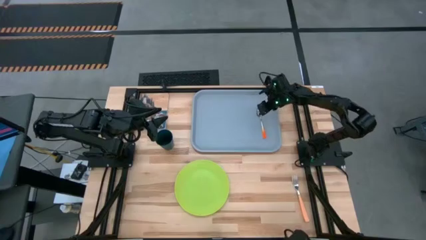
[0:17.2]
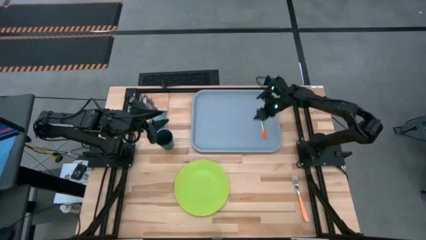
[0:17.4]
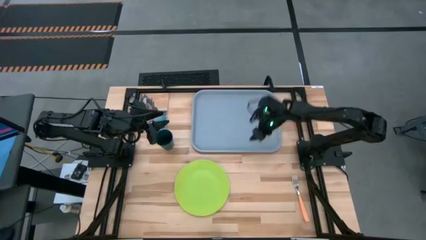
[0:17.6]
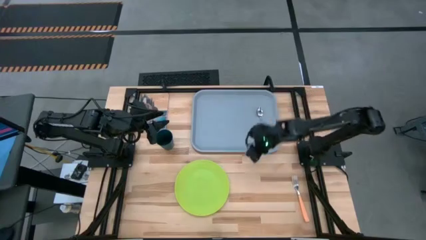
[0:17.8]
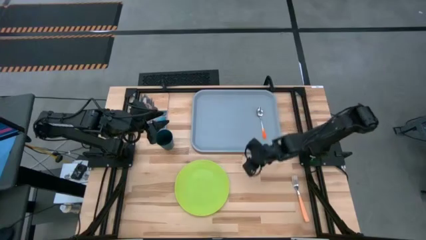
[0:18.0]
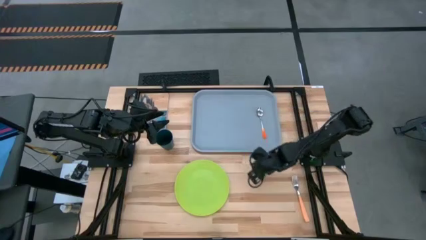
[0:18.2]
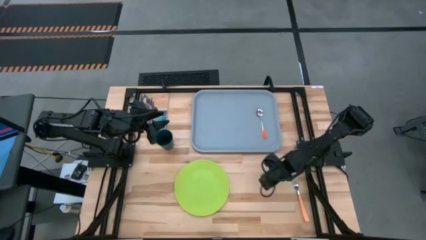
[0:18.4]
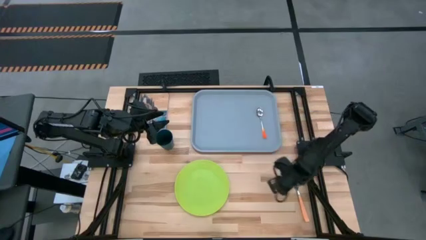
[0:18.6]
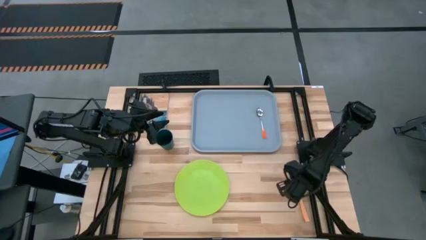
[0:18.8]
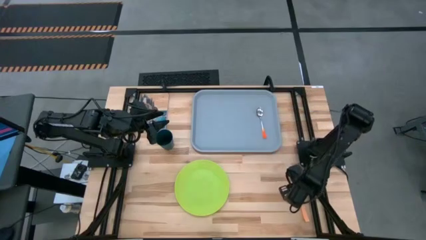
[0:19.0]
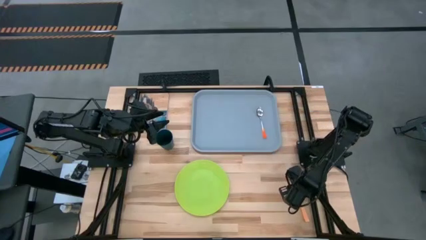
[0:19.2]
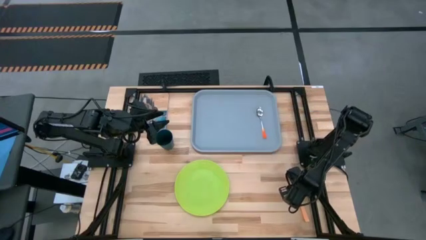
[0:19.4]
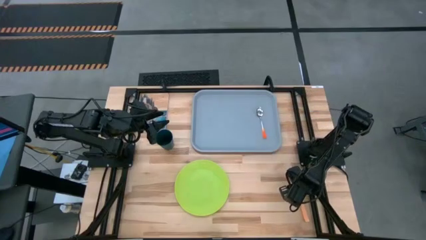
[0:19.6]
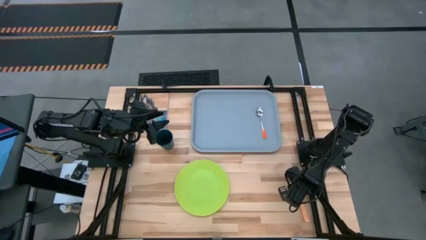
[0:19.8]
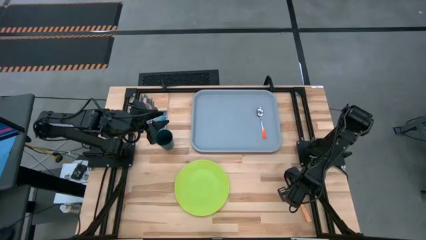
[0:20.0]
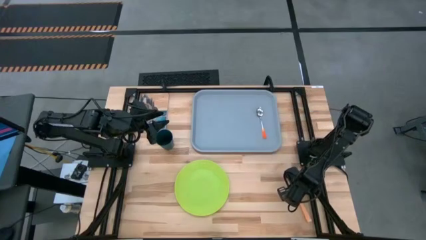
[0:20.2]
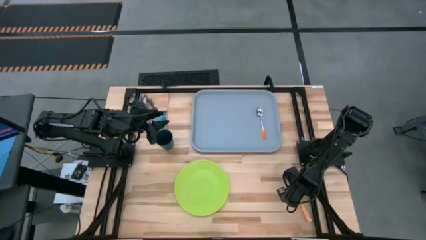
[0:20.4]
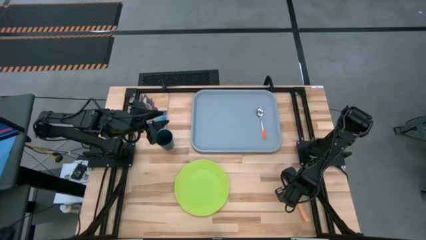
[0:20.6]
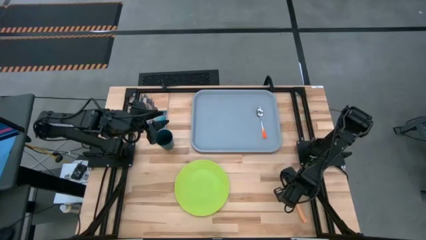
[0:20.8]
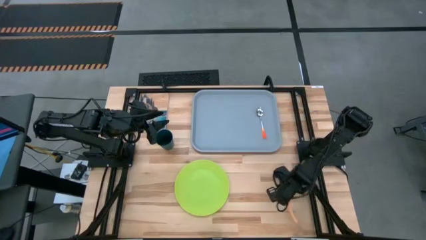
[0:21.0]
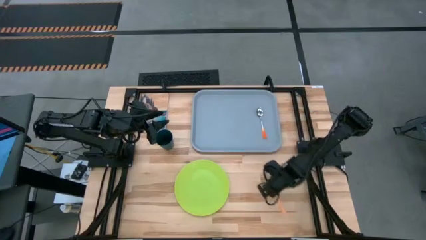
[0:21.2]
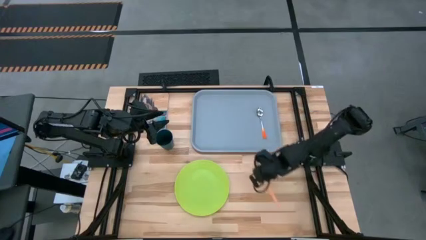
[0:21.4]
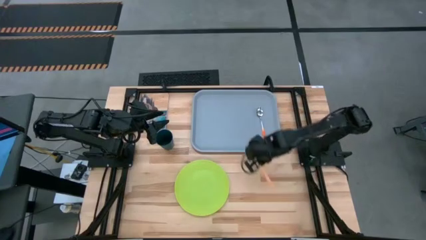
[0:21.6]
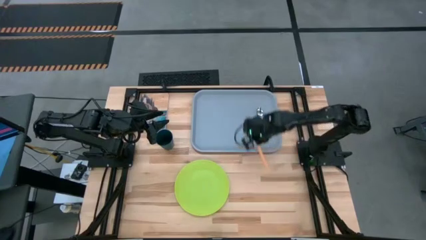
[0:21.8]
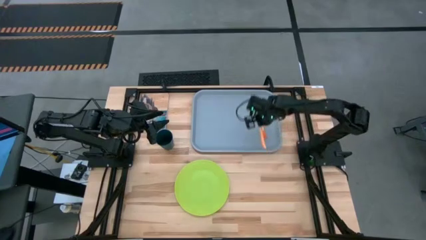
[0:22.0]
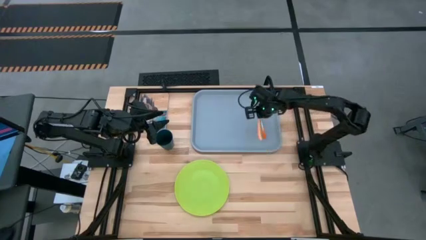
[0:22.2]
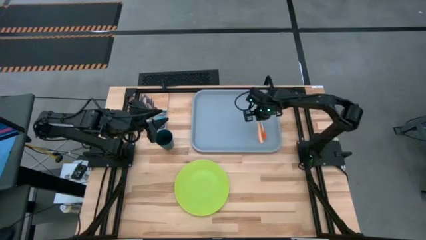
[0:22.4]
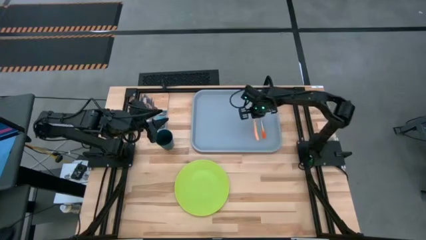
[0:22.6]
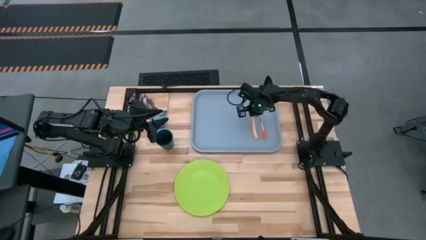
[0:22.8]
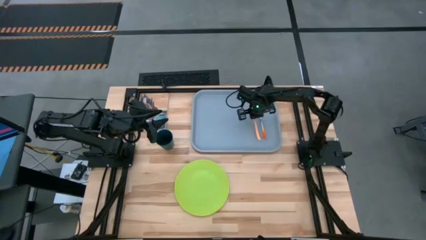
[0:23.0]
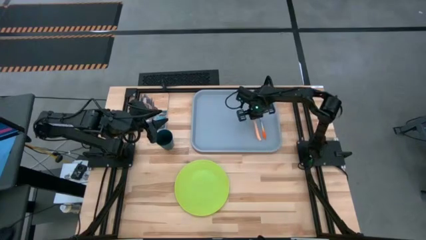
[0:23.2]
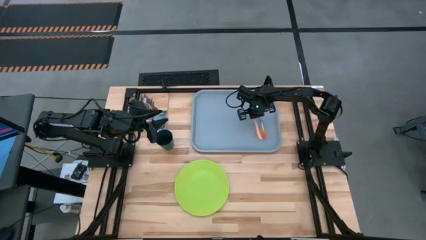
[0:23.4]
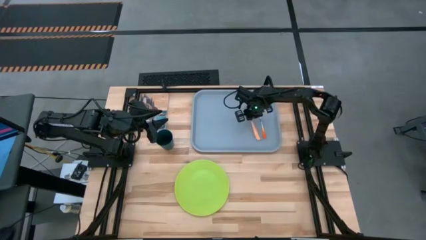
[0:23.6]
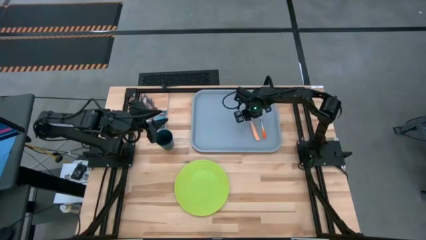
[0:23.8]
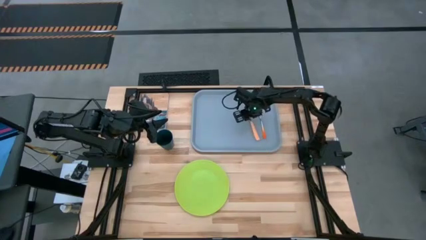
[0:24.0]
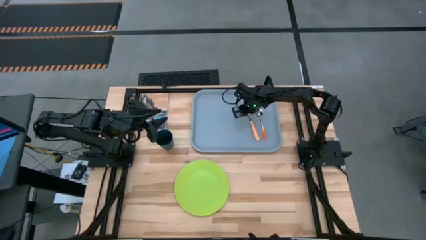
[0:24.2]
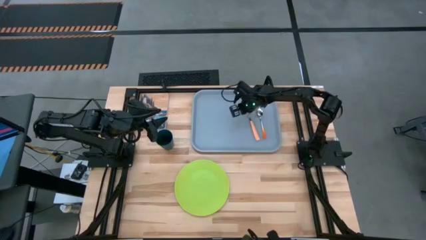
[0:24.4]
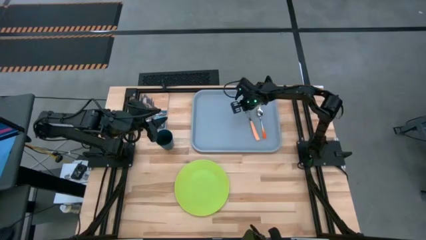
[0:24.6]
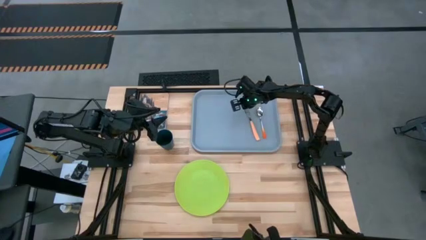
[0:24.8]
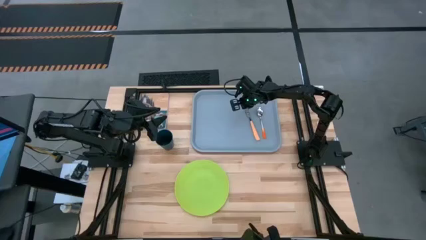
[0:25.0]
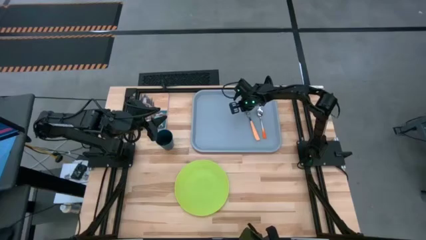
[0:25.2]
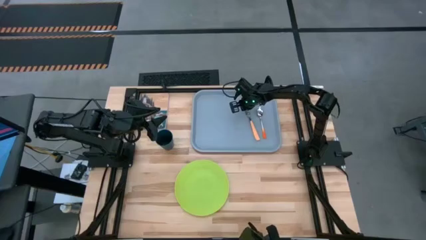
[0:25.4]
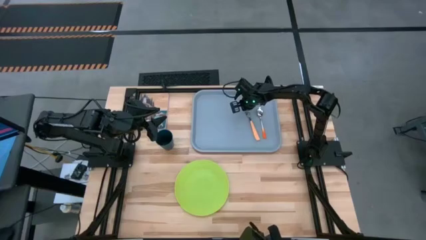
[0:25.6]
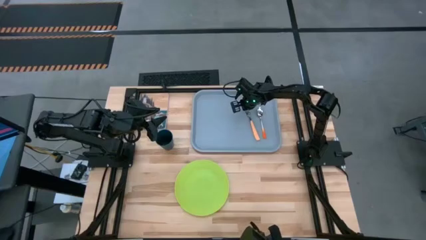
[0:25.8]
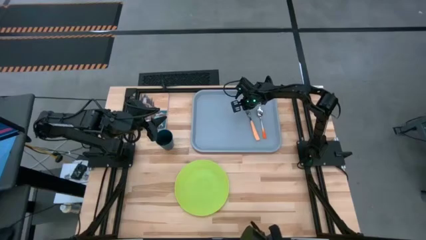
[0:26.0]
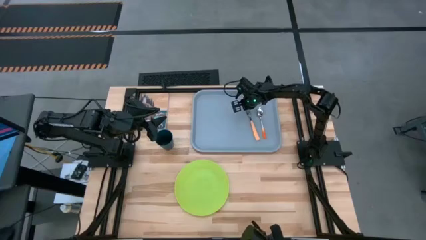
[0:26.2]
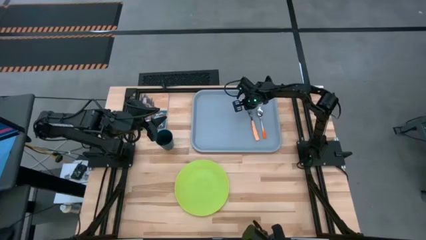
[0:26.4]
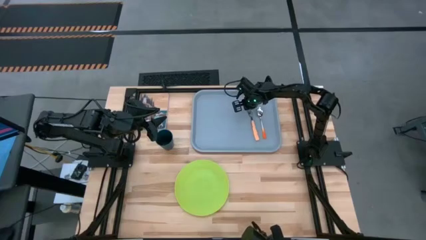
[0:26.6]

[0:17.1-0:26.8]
Task: Pick and place plate/cup/fork/spoon on tray
Put the light orange fork on the gray tray to the left of the spoon

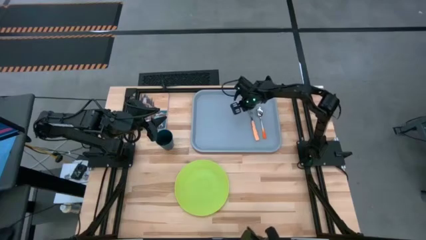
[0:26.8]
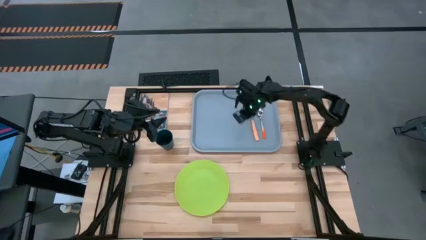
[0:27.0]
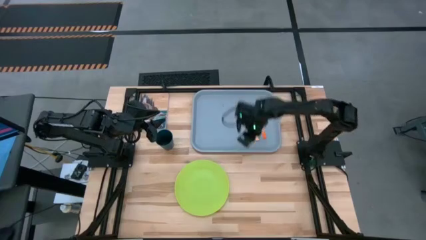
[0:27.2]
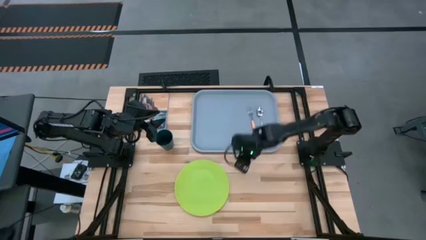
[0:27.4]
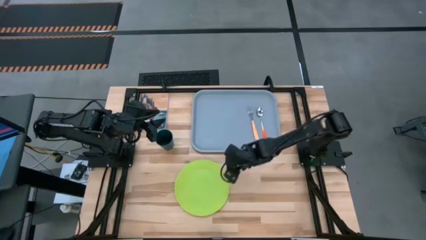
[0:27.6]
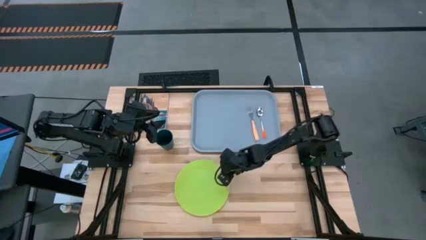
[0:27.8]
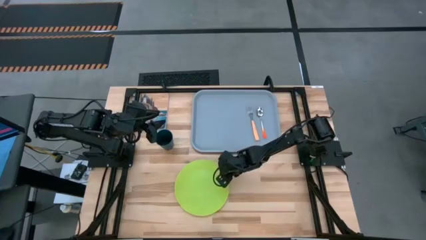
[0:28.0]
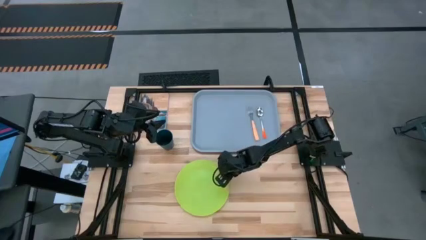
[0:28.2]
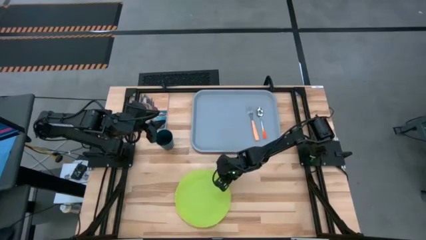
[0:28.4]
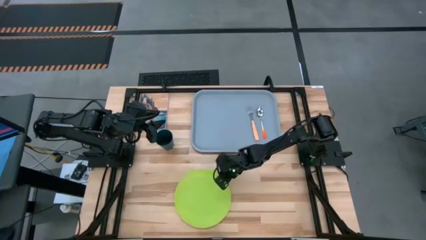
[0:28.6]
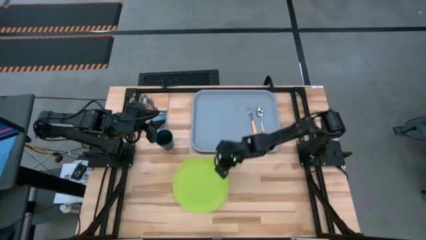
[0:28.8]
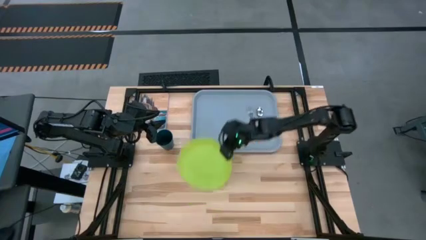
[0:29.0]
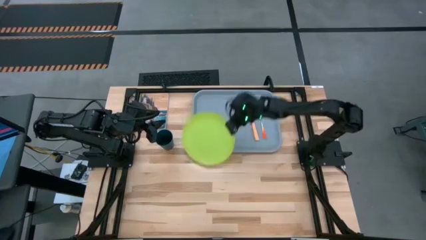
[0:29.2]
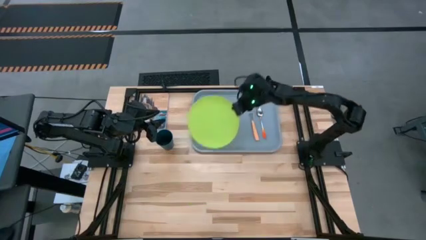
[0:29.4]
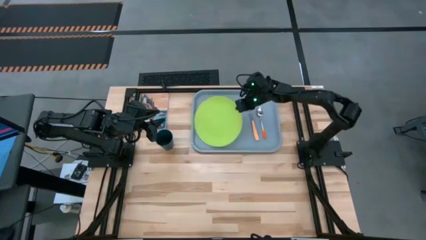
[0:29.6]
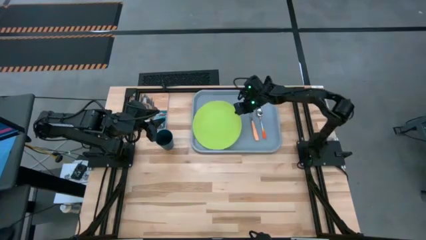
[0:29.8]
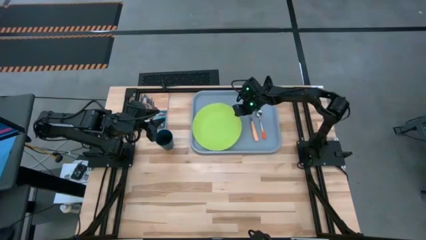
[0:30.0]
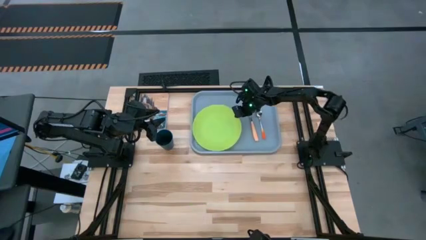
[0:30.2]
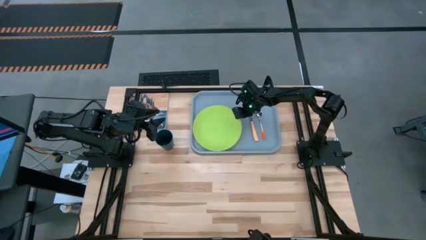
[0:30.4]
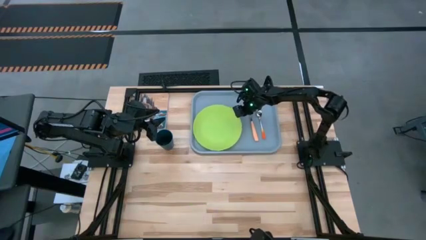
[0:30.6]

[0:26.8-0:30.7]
Put the green plate on the gray tray to the left of the light orange fork

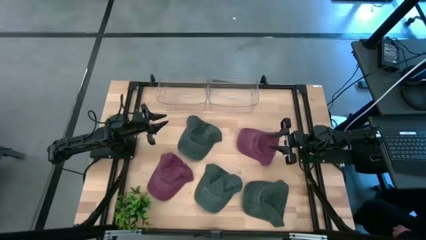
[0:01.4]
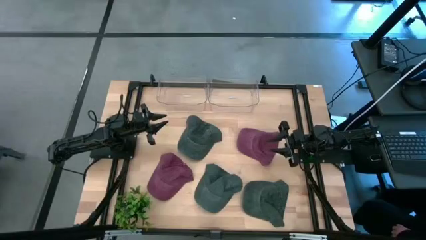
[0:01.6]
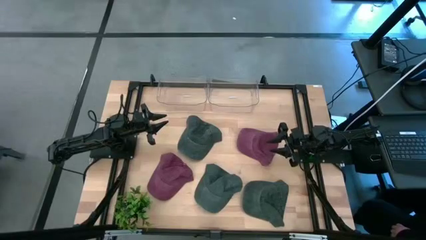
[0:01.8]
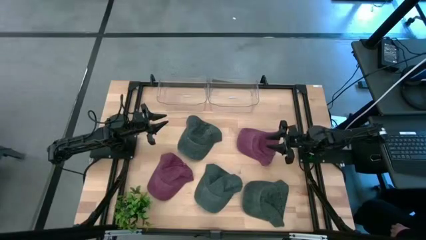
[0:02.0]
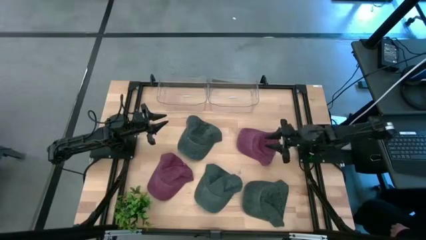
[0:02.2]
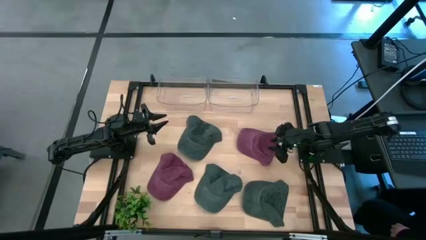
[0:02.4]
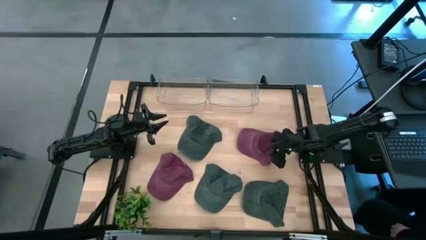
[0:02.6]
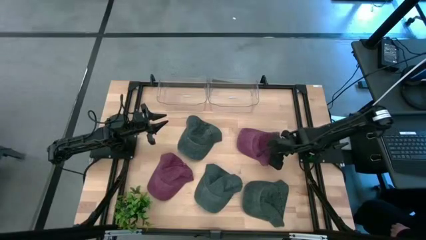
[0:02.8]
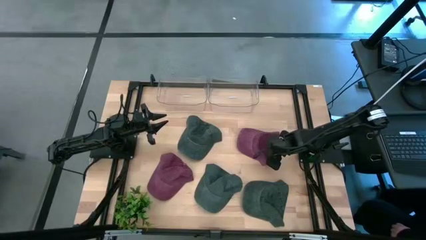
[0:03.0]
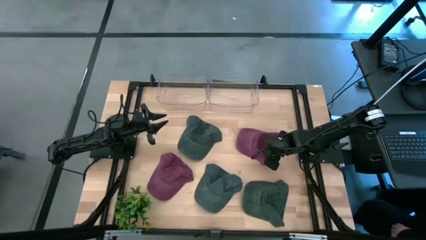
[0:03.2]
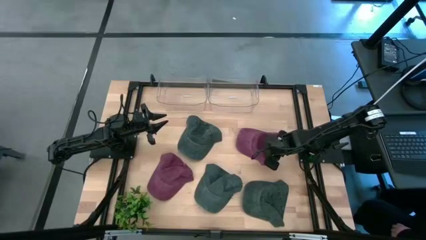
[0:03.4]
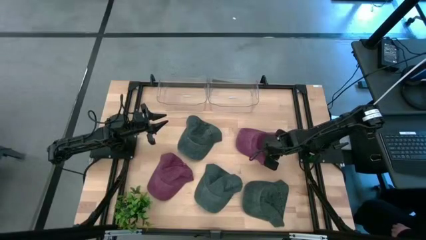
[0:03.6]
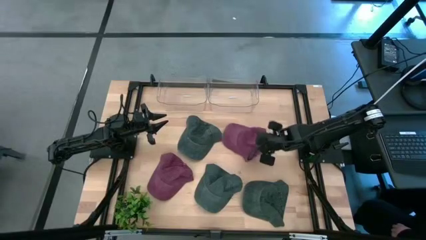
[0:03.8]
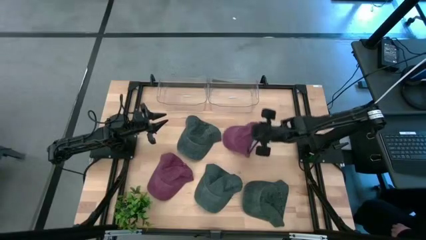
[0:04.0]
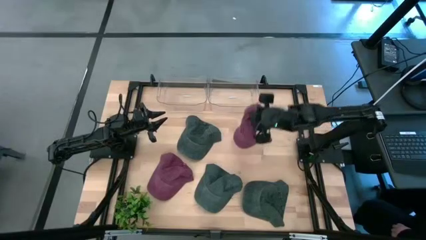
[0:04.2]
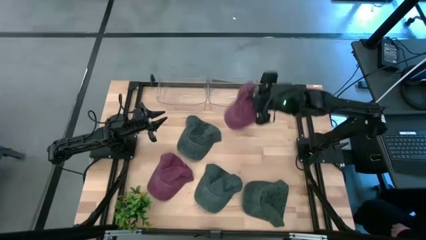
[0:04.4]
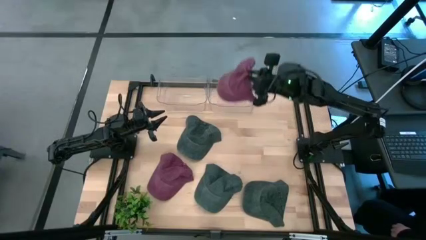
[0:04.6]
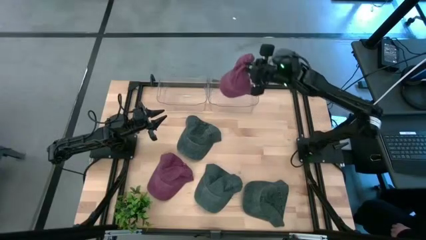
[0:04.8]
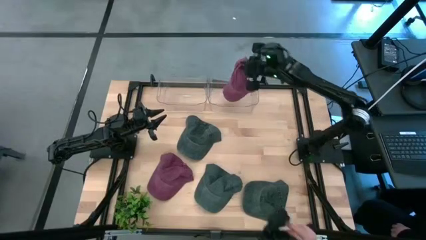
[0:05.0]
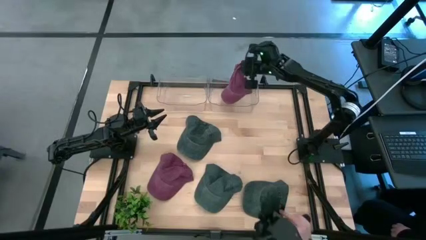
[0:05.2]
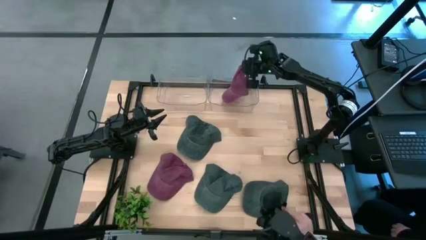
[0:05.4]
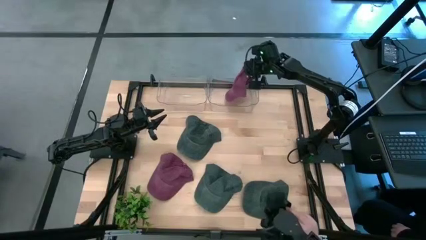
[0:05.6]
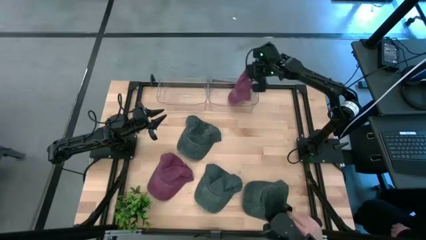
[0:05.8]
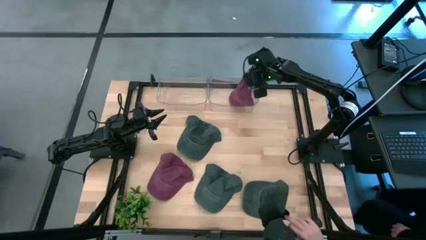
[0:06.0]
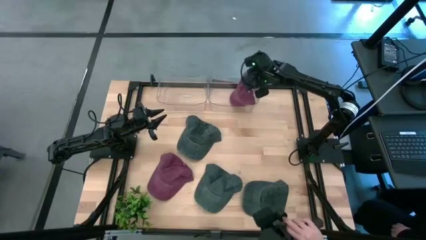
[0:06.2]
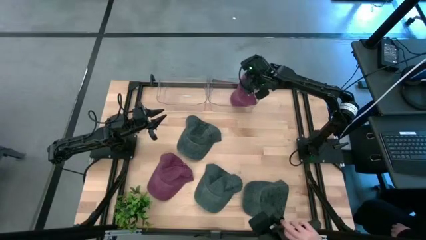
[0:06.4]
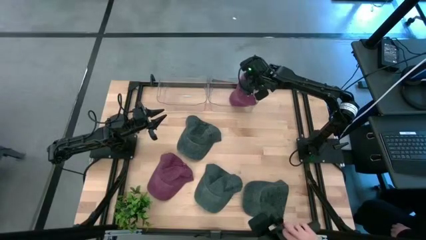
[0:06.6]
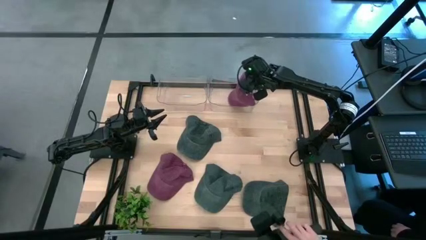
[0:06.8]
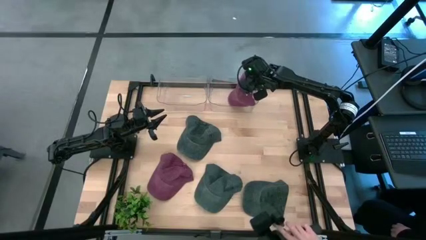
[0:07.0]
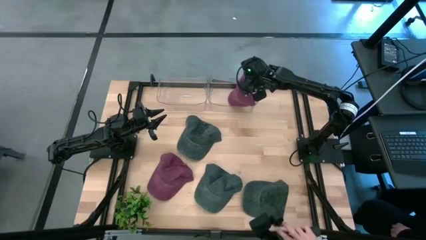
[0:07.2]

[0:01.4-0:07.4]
Task: Pick & Place hat
Put the right red cap into the right transparent bin
